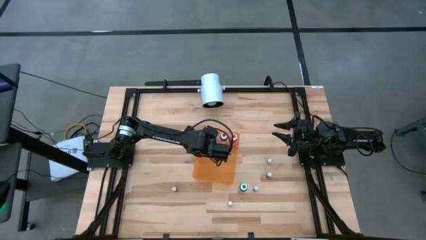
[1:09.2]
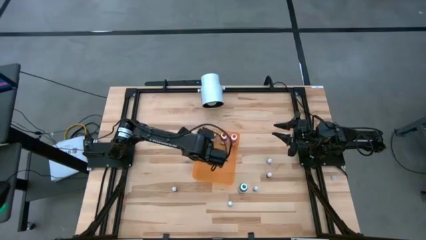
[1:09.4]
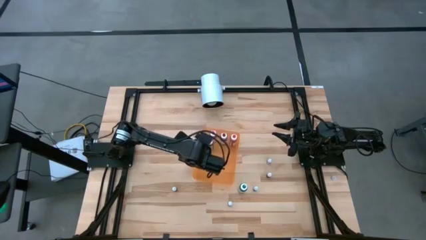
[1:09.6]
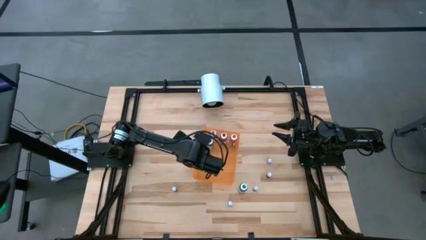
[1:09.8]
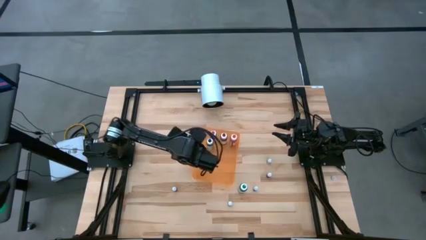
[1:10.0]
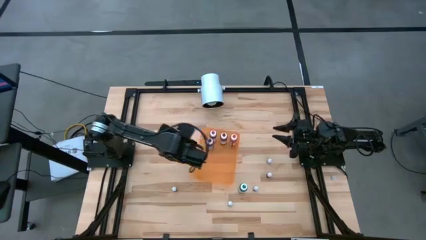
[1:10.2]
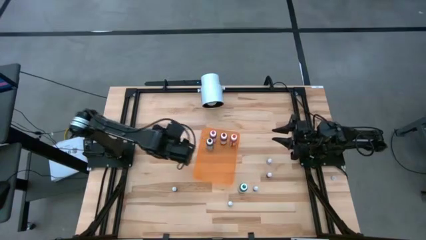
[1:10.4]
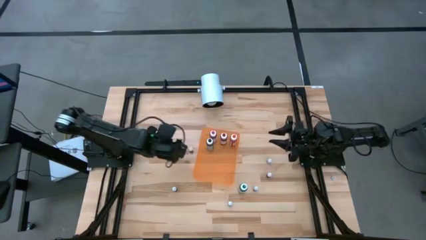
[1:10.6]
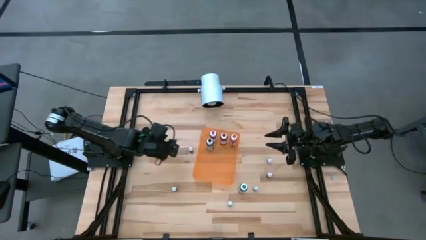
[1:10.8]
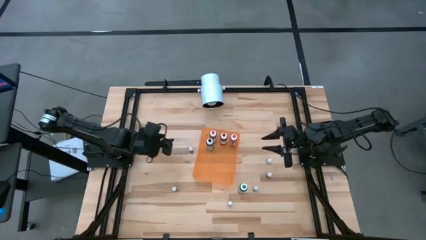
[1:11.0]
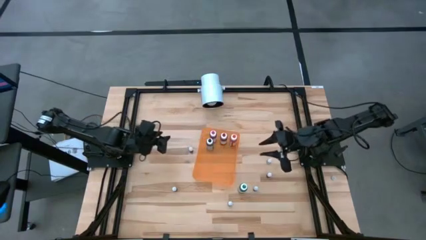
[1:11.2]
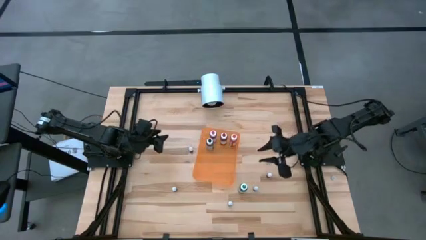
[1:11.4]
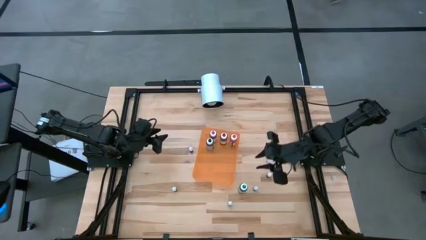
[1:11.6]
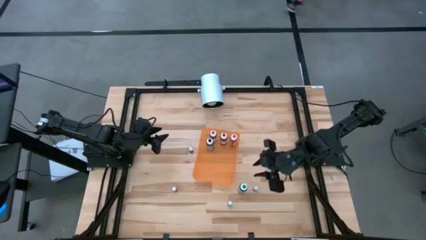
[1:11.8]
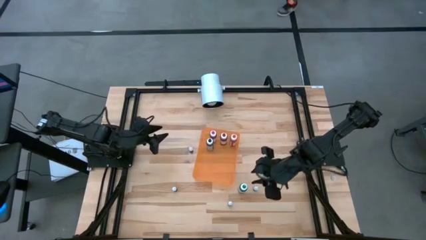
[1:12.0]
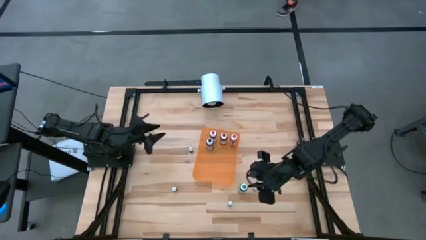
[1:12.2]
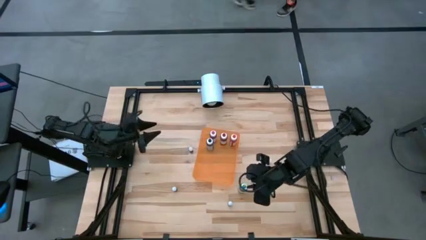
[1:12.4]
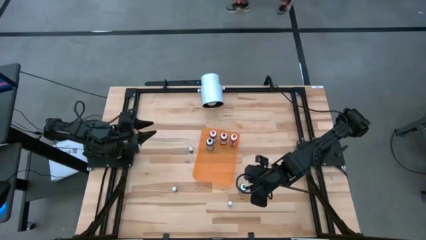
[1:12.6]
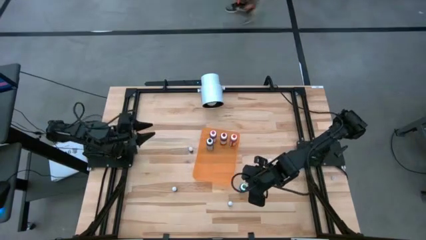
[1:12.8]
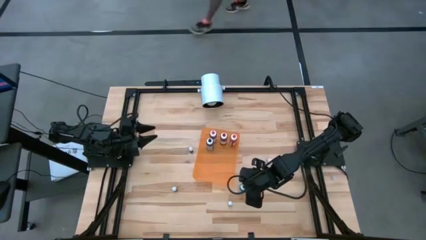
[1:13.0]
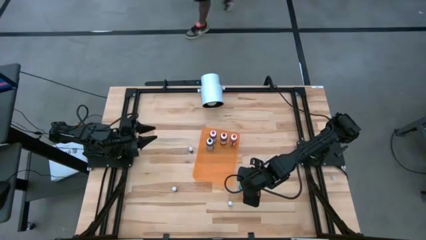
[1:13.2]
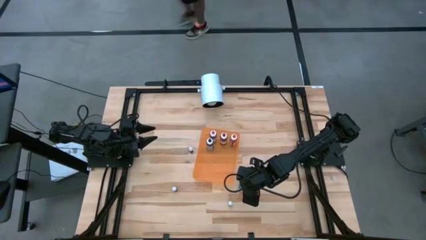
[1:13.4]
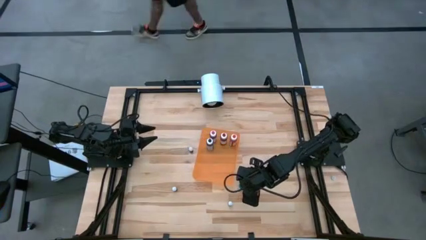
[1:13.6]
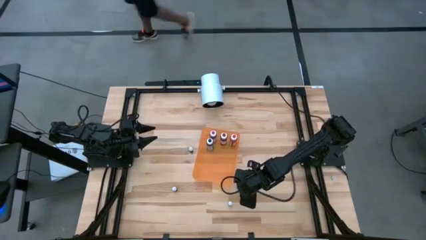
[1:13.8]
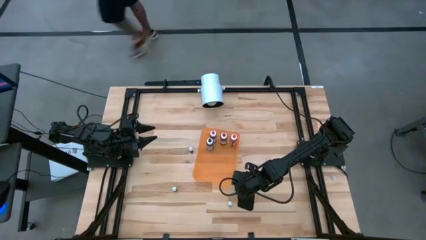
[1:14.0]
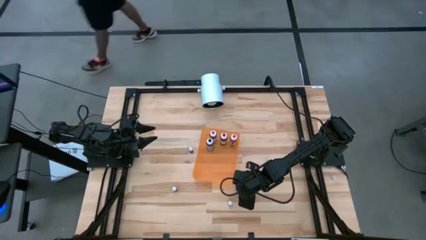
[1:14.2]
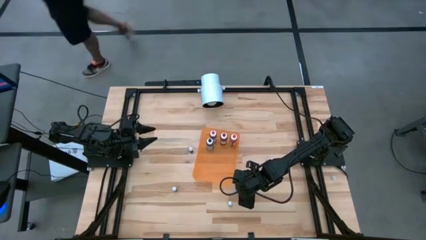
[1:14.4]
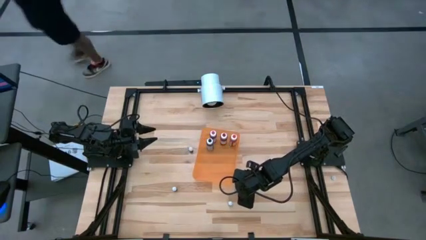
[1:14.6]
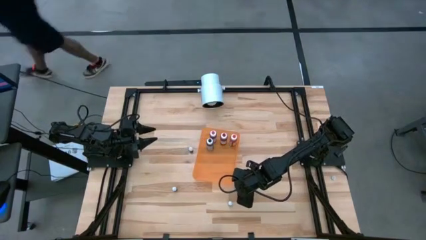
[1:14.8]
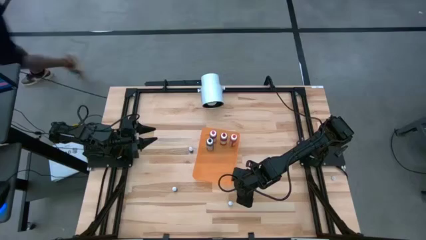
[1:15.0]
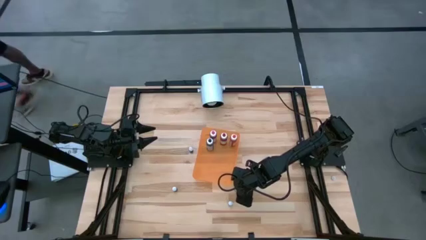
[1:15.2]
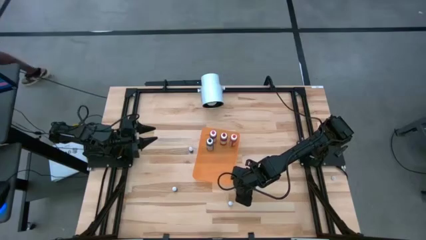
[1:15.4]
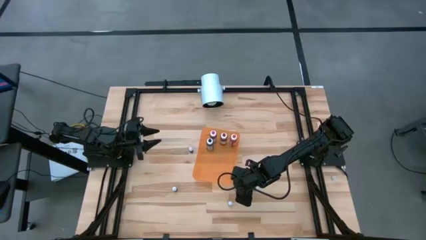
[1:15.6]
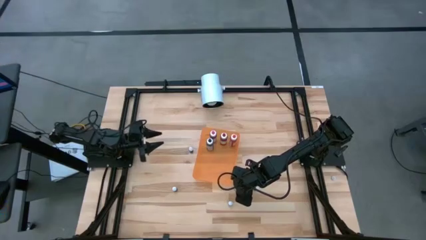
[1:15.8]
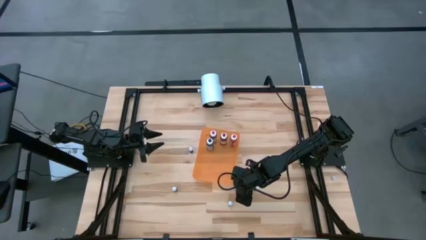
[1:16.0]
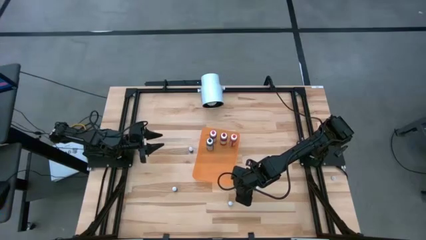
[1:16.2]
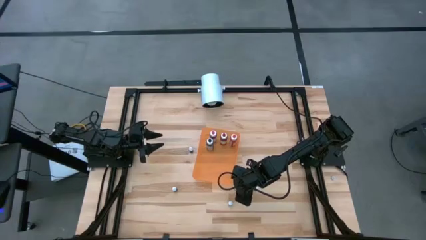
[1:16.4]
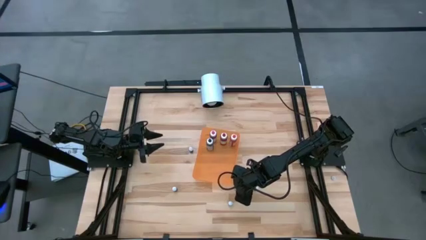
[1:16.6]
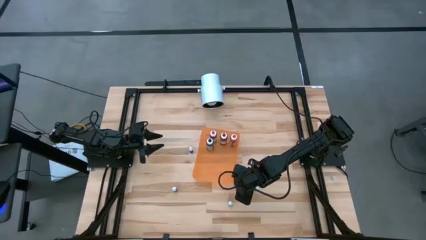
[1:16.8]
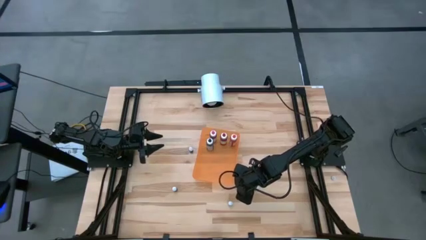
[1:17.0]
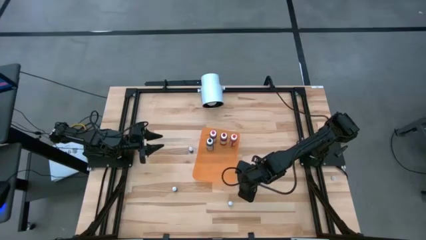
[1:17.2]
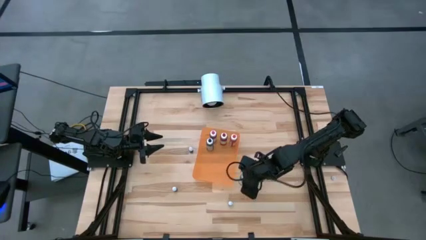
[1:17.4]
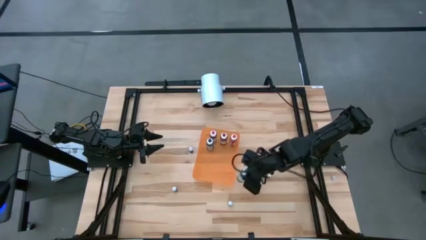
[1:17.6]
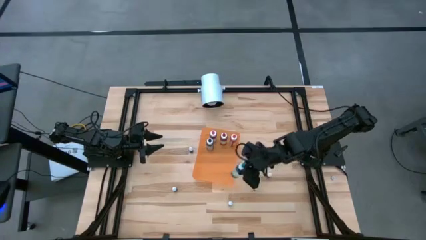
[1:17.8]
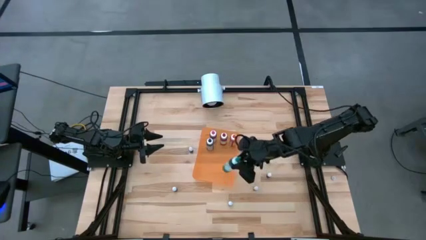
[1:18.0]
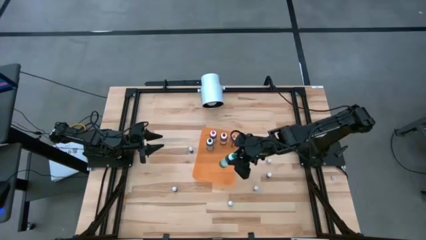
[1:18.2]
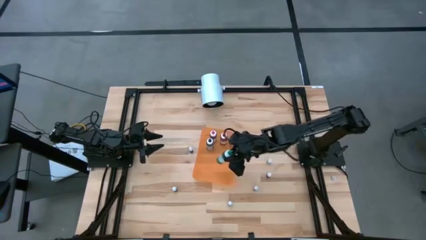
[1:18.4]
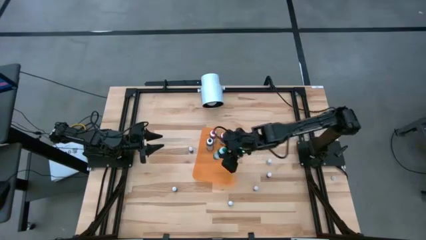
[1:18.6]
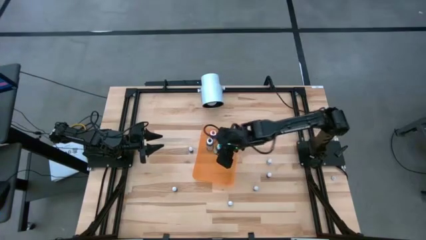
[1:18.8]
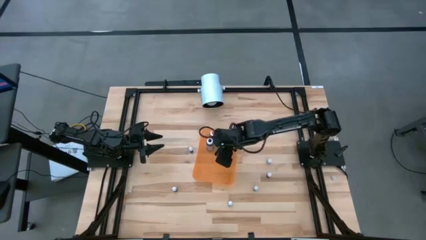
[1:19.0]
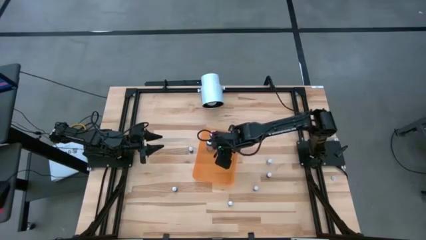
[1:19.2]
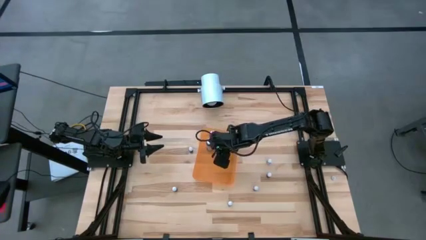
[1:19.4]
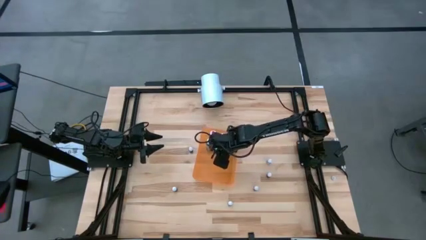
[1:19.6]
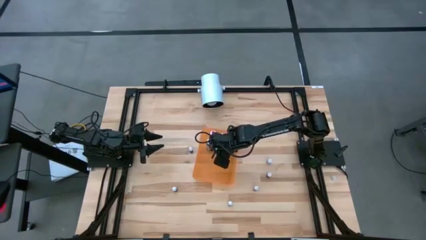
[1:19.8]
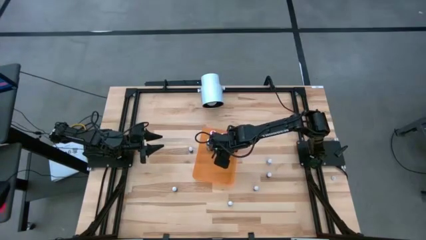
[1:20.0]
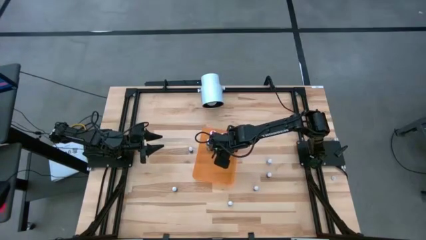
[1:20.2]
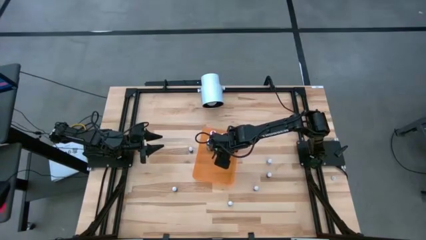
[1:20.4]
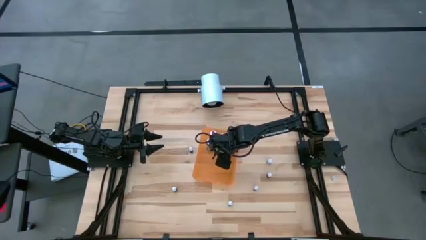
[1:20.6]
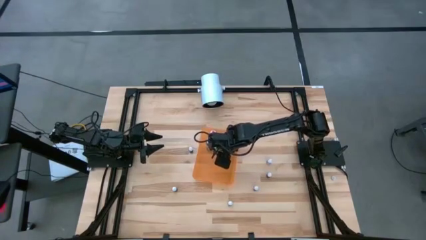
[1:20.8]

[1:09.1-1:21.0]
Task: Pick & Place food coloring
Put the large green food coloring bottle into the orange bin

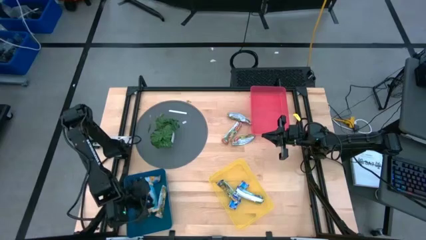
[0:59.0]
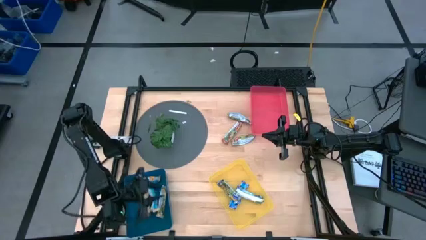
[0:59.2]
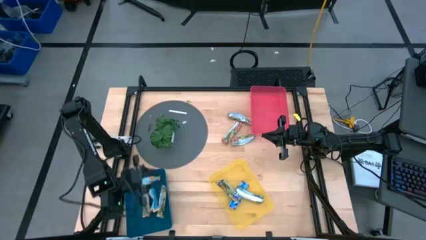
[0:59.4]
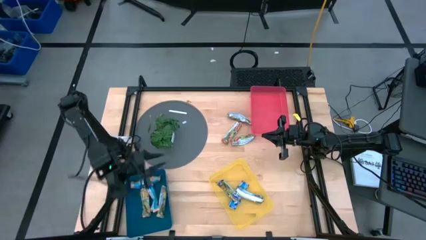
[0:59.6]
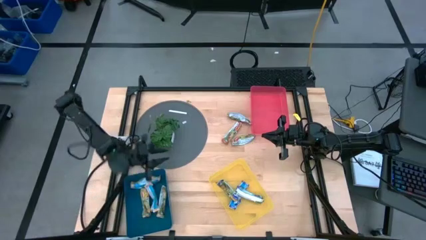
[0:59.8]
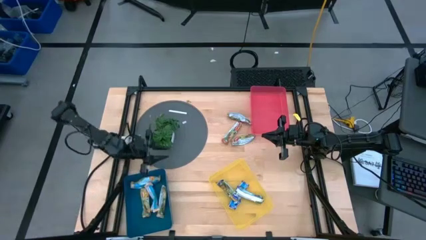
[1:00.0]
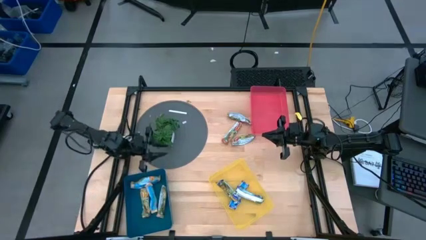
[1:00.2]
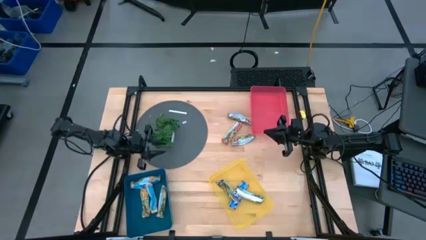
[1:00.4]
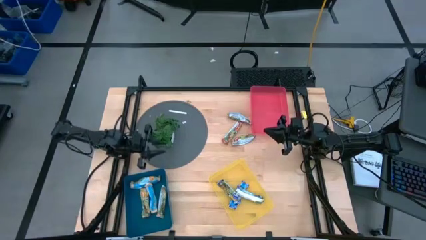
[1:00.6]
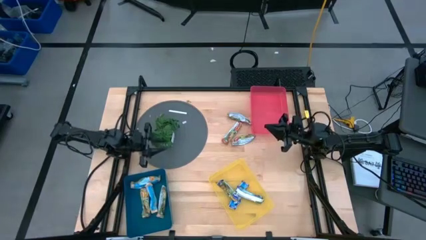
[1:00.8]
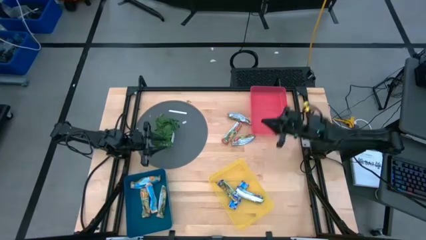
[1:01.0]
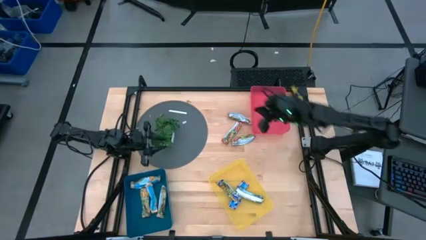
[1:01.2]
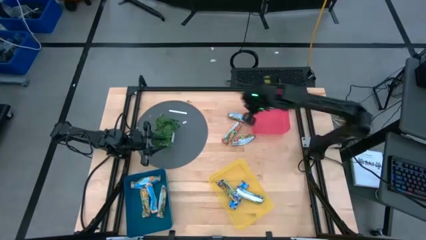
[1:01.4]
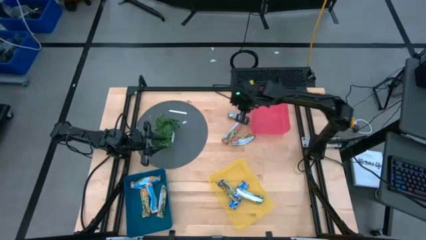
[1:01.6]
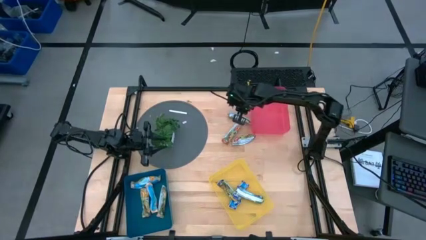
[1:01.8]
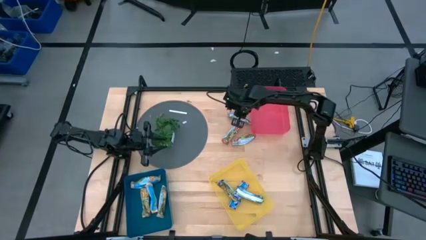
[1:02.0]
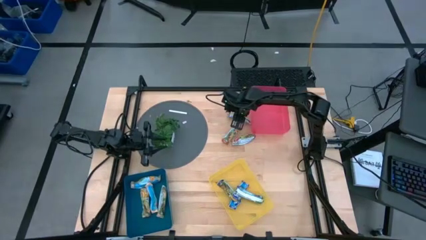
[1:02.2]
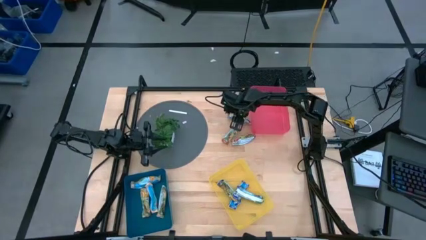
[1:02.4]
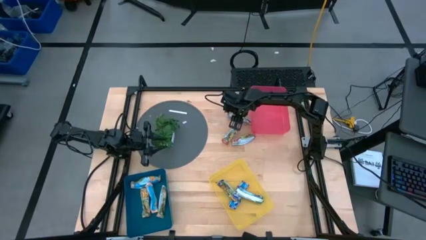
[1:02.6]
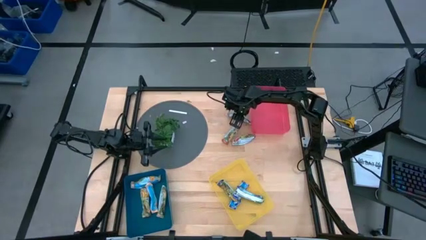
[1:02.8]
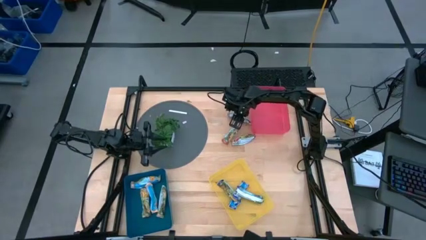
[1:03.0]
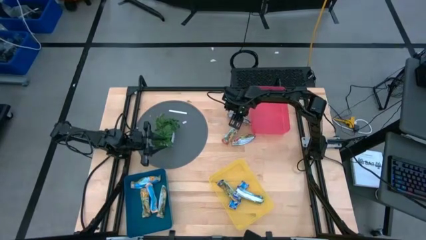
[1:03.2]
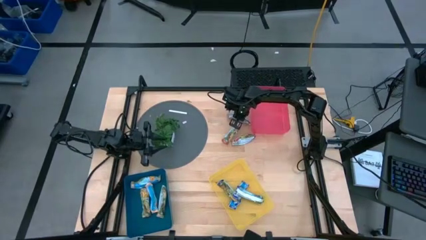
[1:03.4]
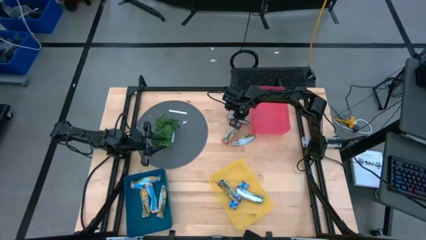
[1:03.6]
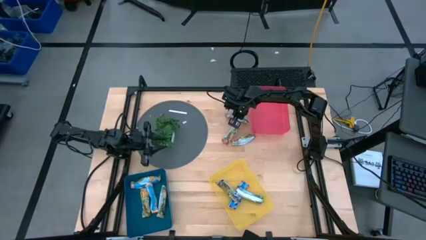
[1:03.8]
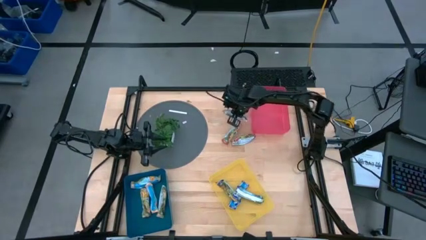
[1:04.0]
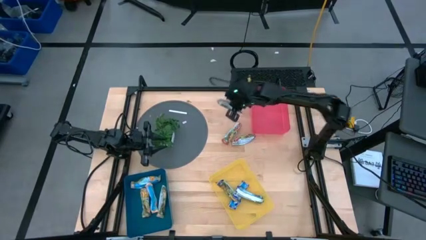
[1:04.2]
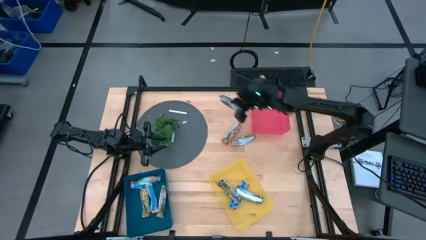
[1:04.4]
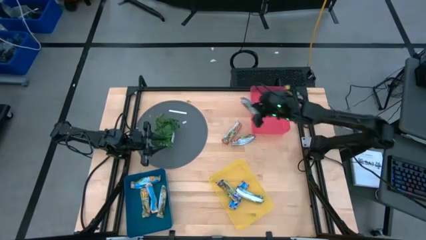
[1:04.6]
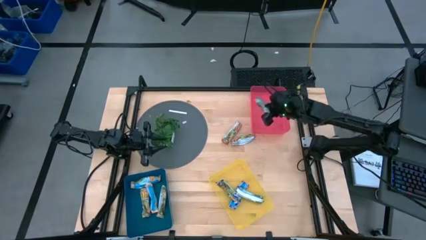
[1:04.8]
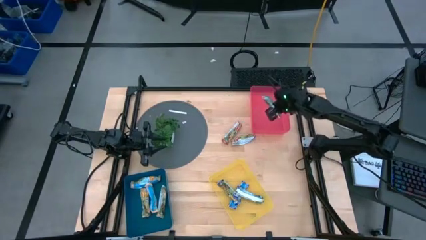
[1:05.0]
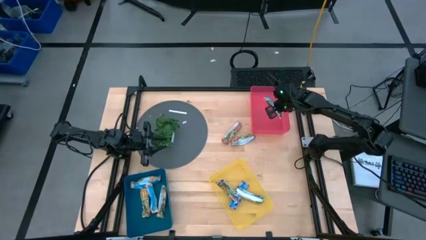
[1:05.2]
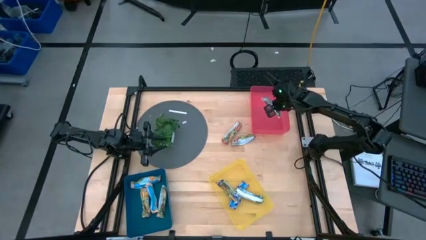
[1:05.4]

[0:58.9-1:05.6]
Task: Pick and place Granola Bars by type
Put the red snack into the pink bin
